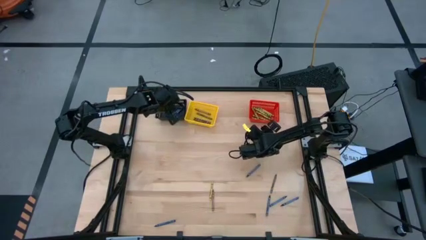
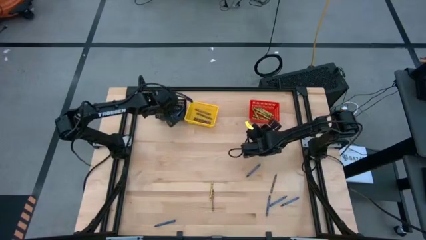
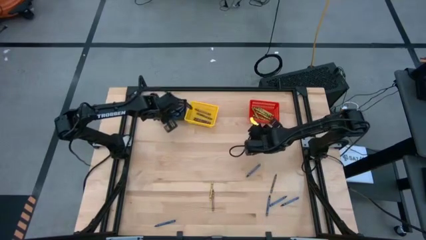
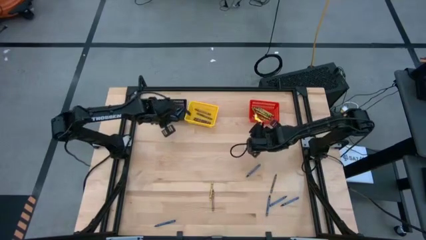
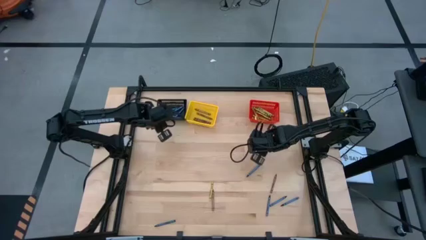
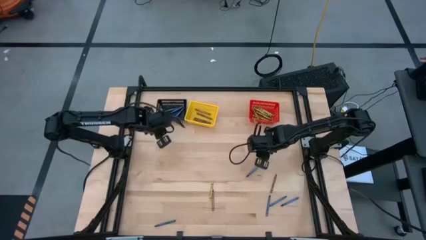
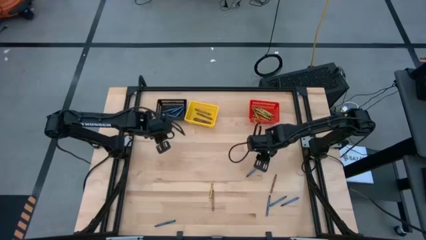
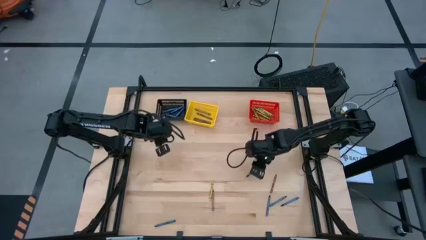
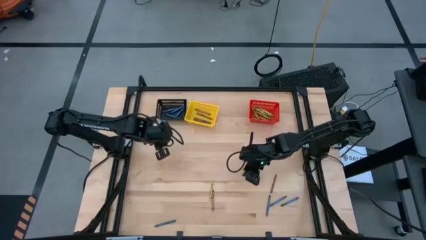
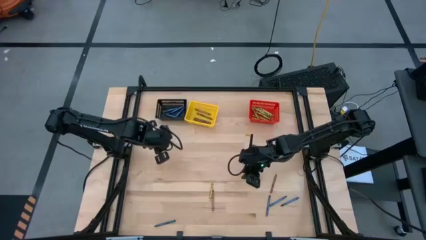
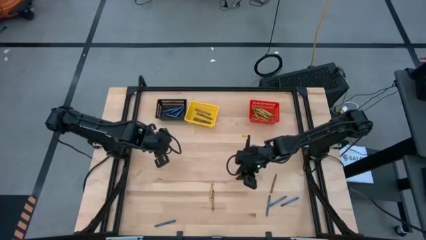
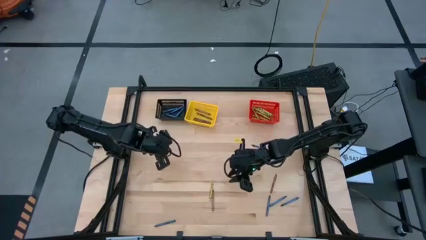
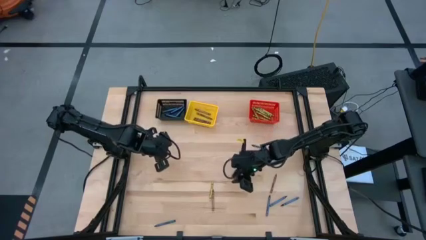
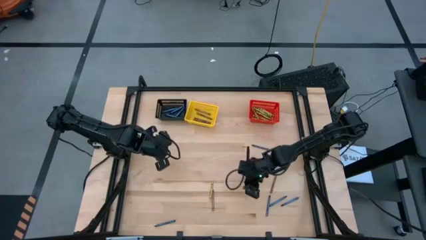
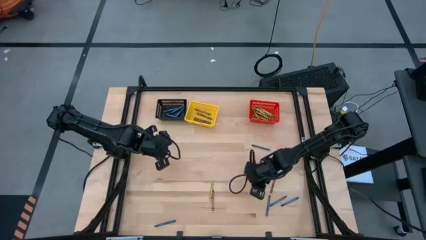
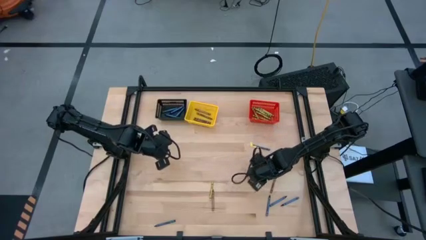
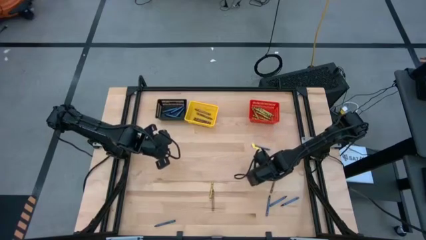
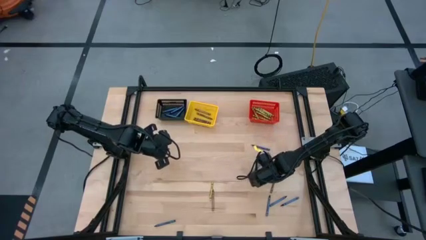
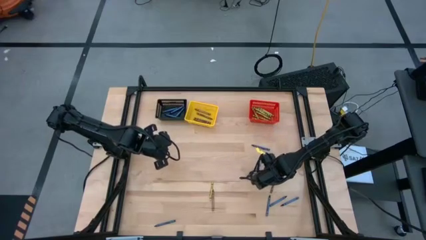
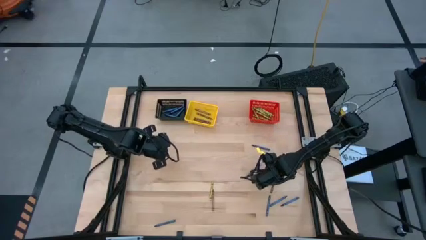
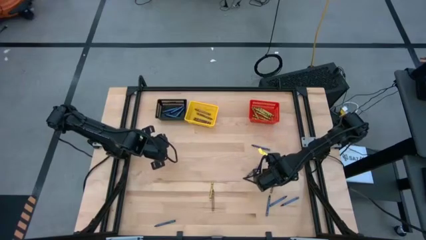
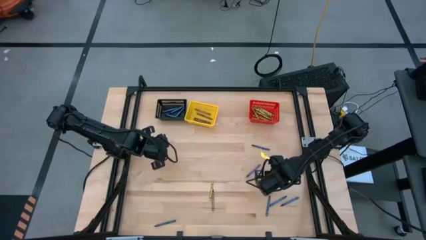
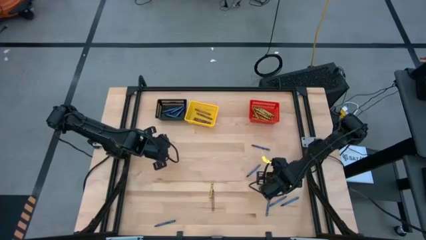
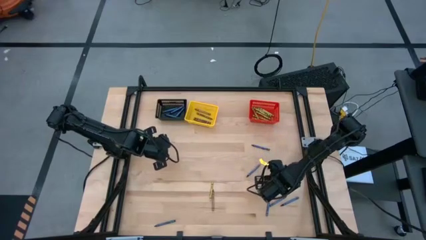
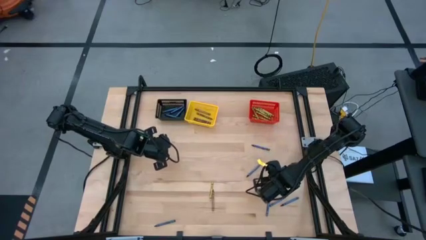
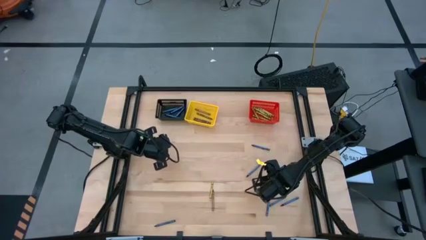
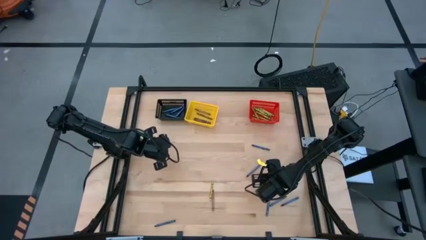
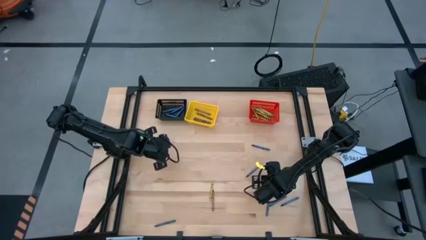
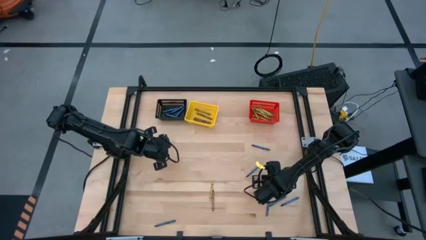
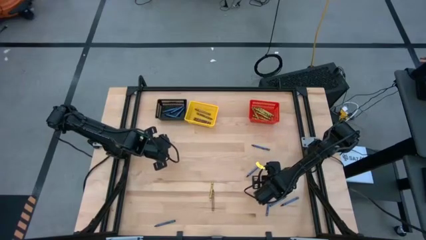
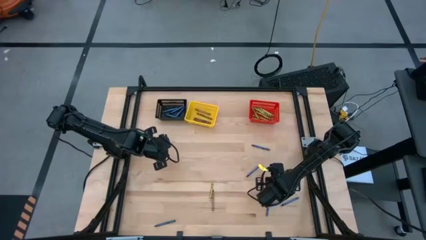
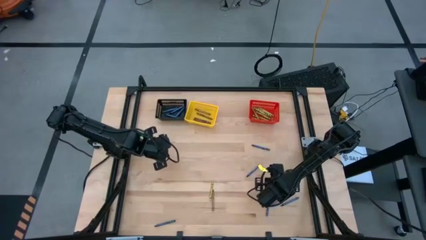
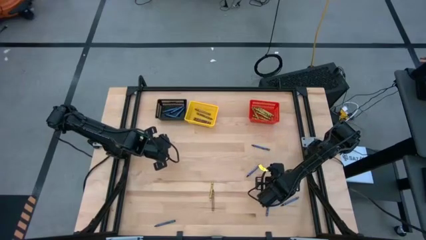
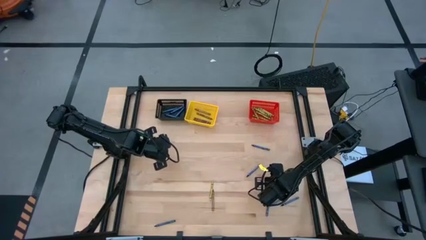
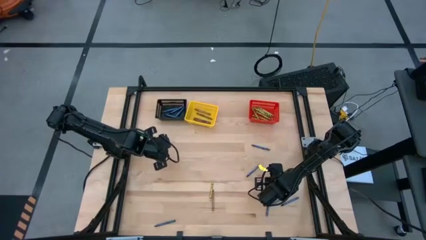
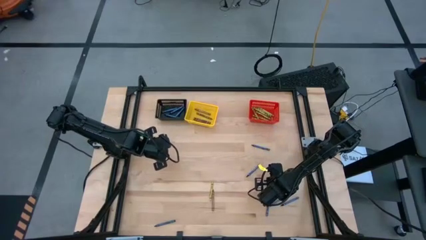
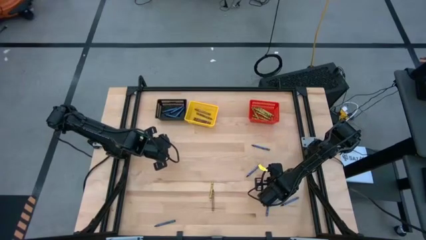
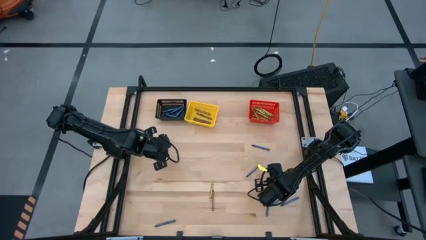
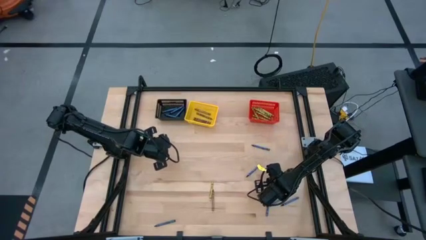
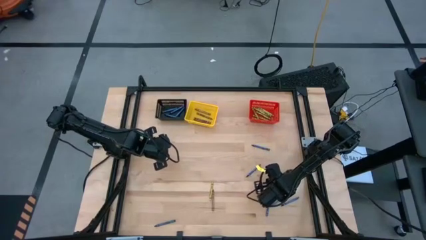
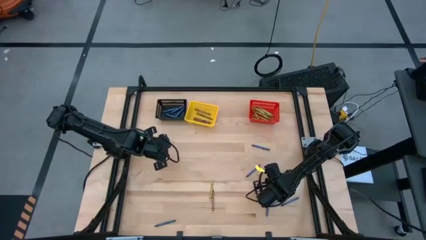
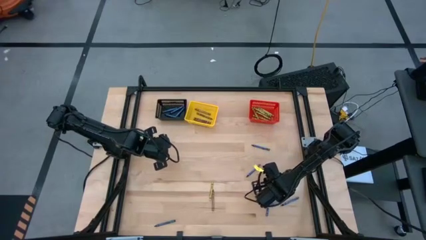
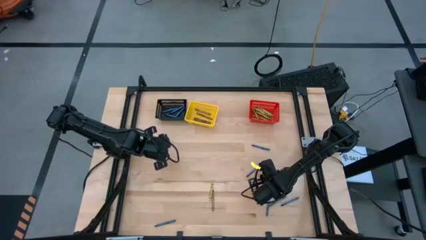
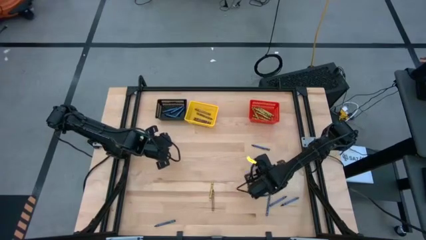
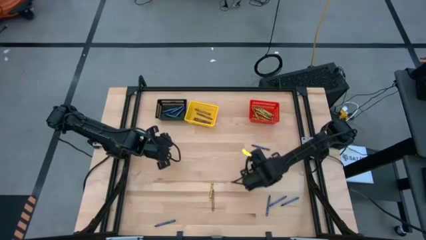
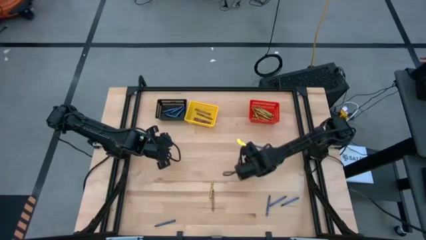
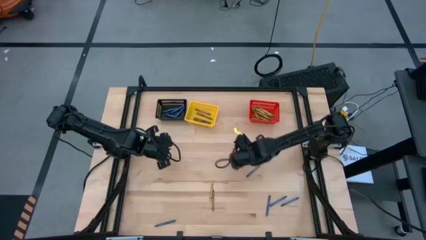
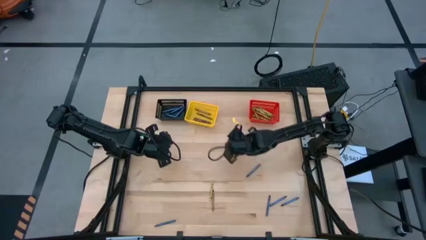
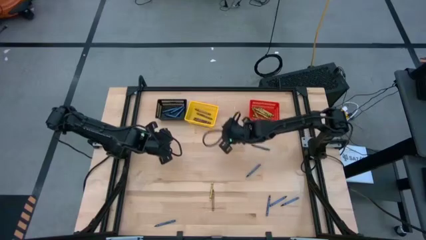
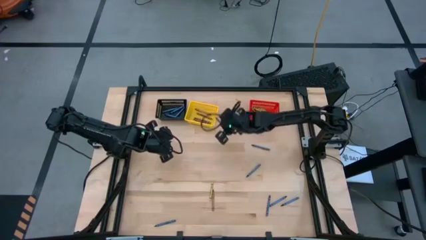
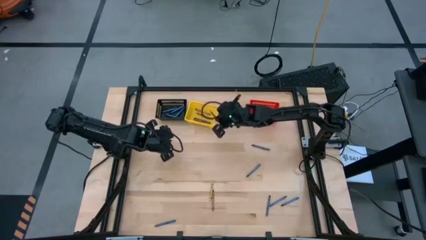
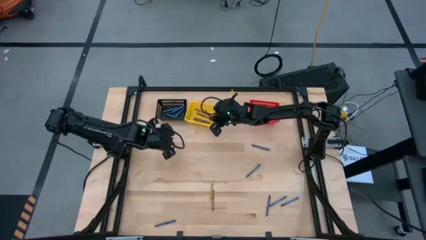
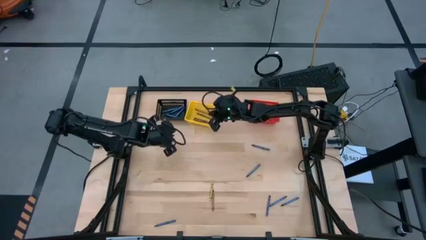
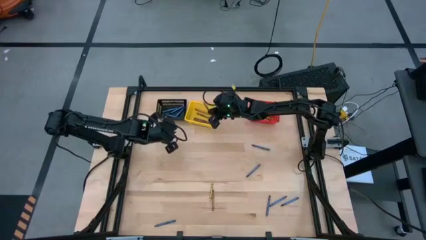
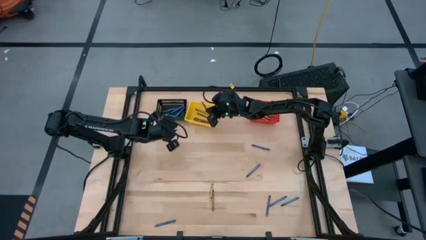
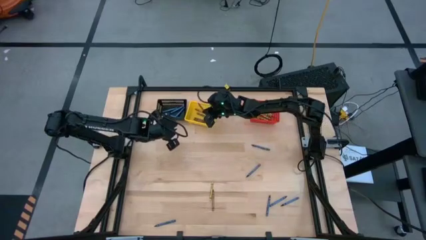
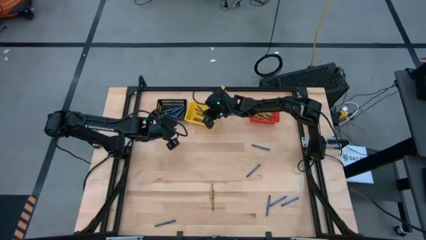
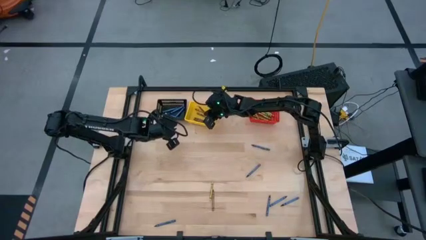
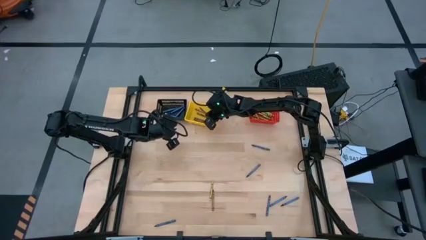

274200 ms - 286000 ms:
Task: Sort crayons
Put the right crayon into the yellow bin

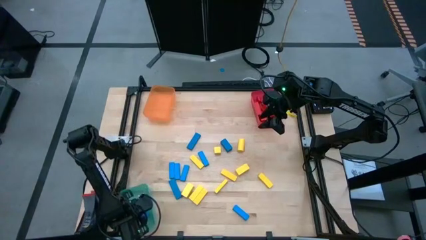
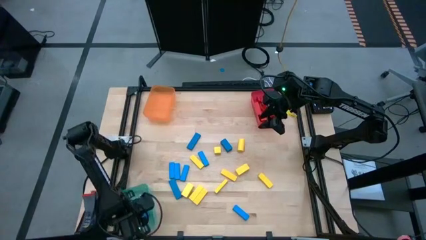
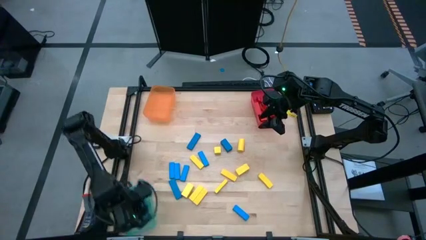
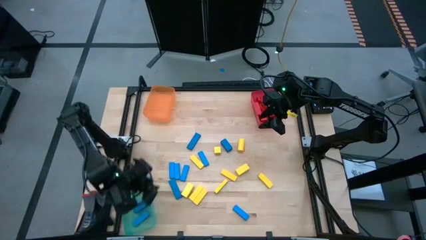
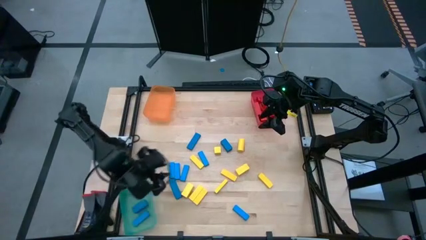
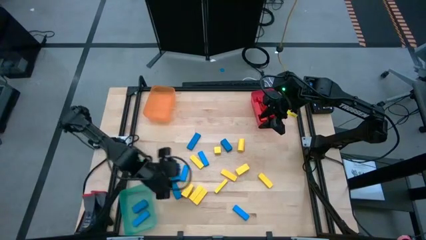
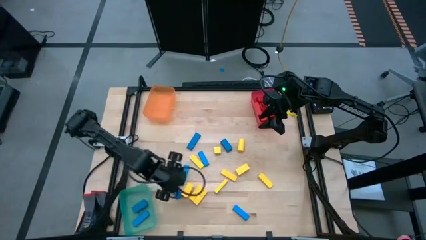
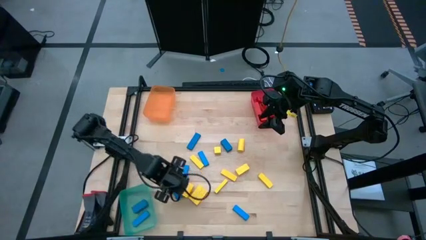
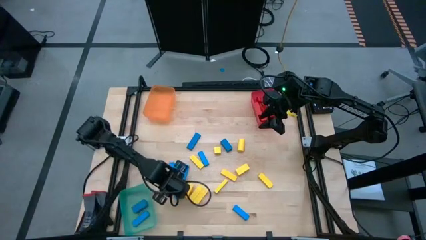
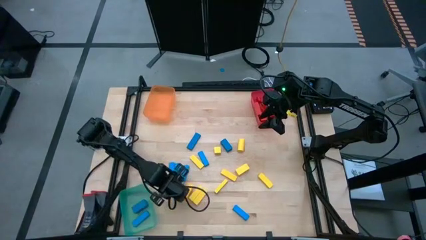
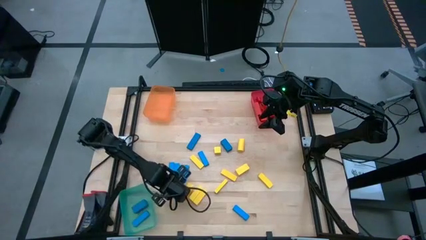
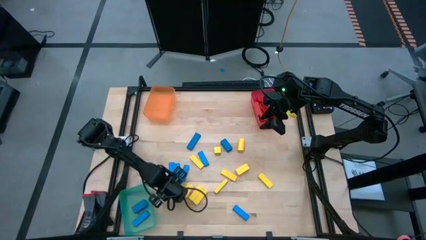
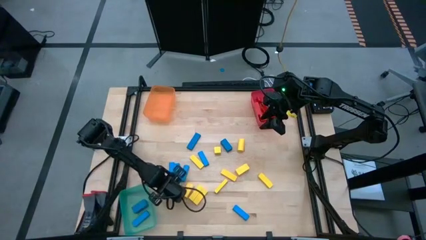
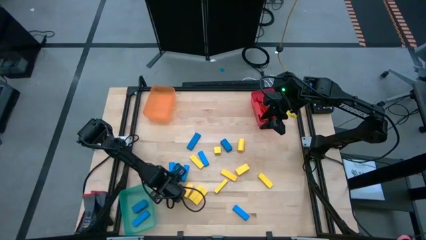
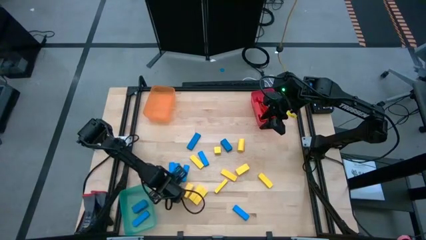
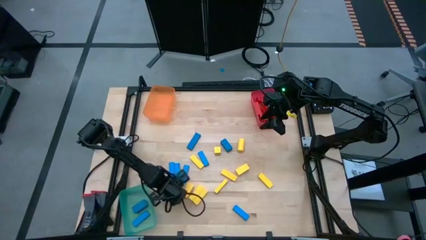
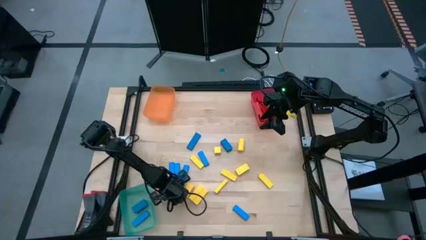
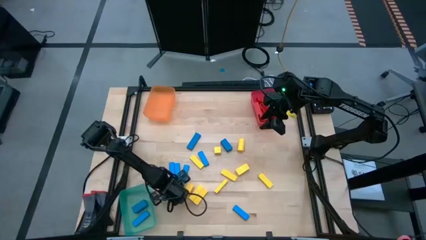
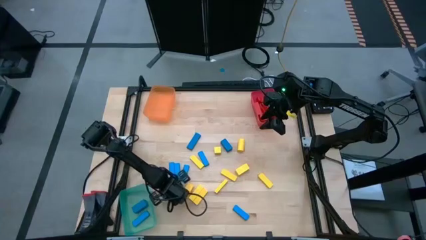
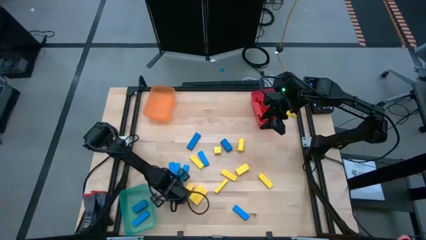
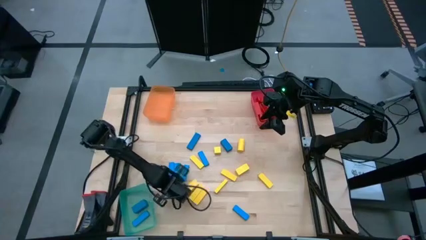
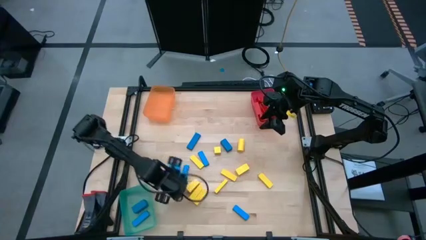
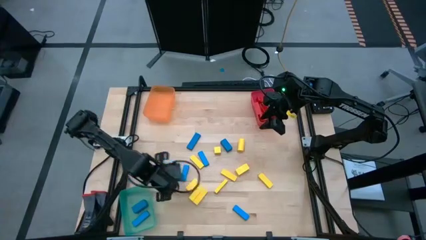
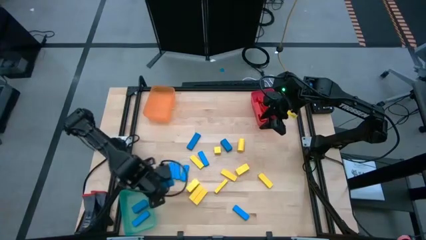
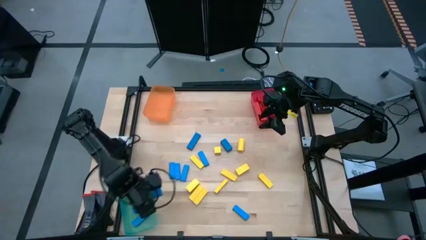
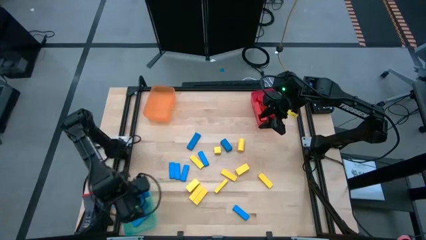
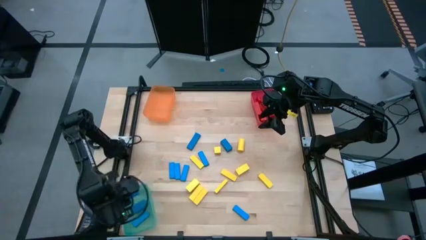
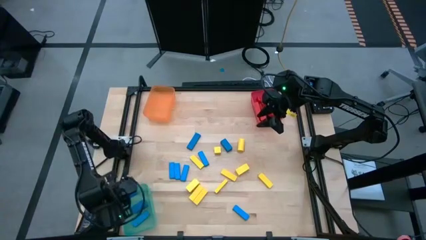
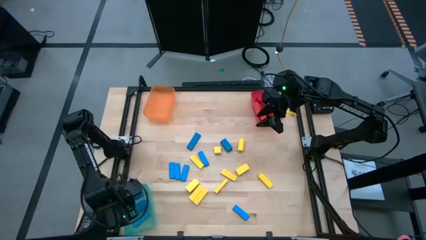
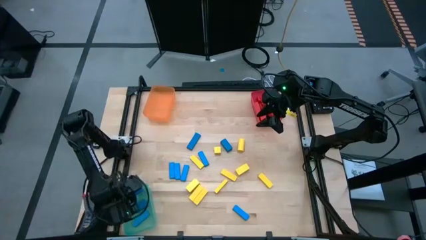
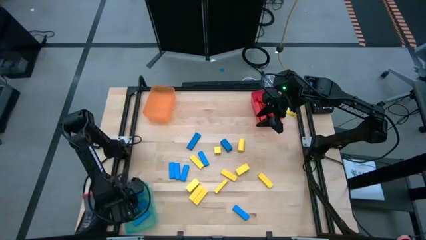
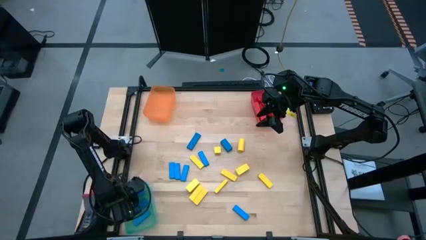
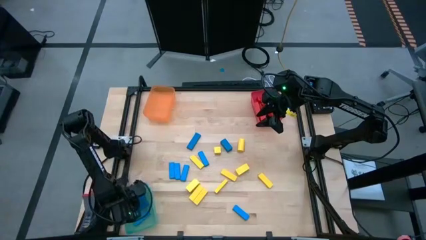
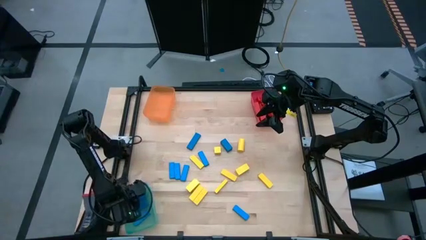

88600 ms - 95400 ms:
Task: Sort blocks
Put the blue block into the green transparent bin
